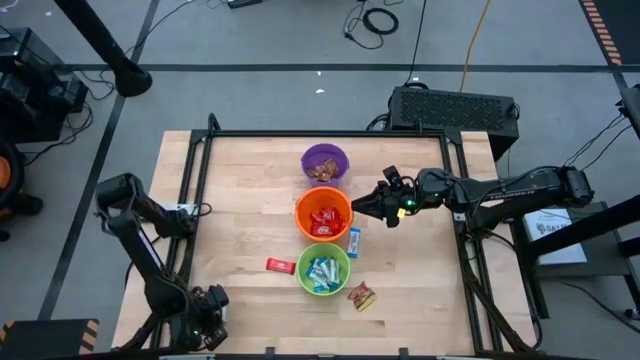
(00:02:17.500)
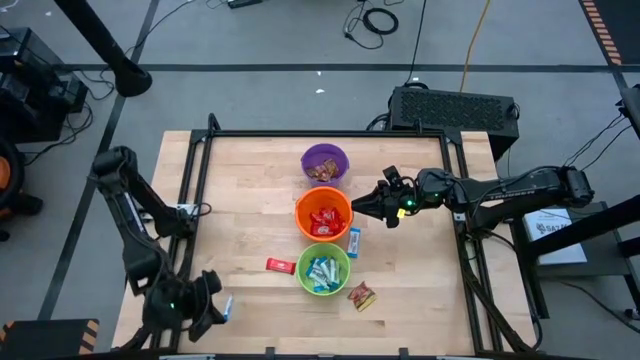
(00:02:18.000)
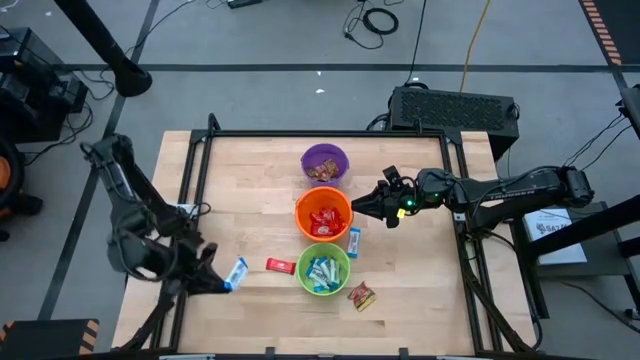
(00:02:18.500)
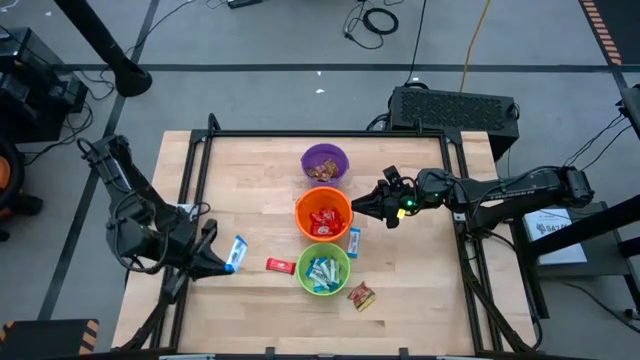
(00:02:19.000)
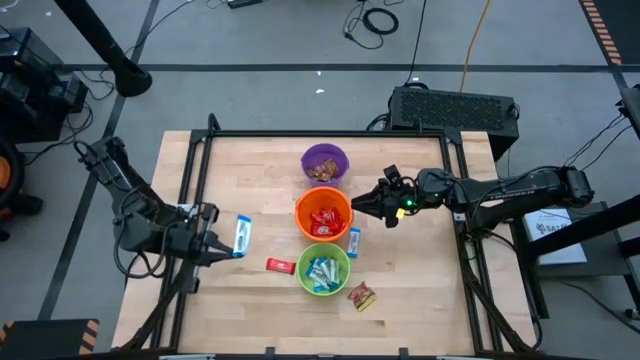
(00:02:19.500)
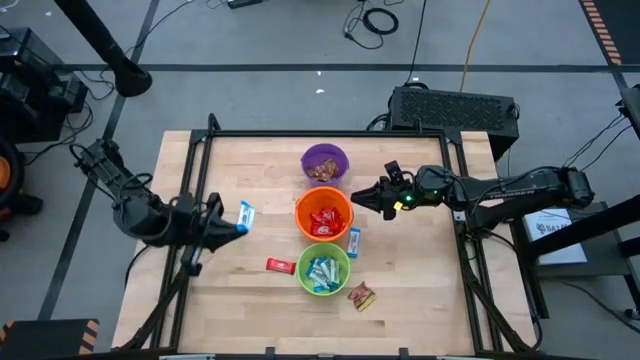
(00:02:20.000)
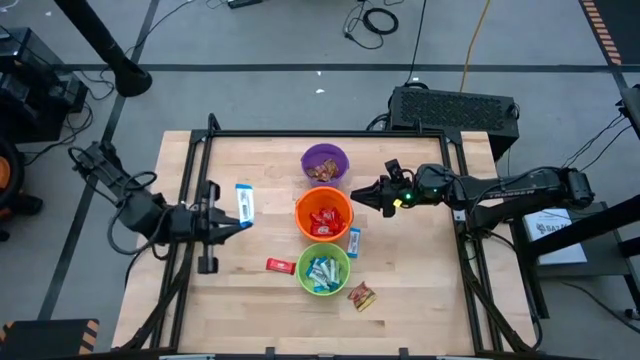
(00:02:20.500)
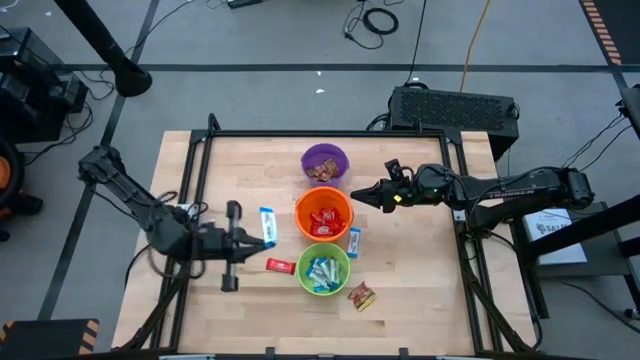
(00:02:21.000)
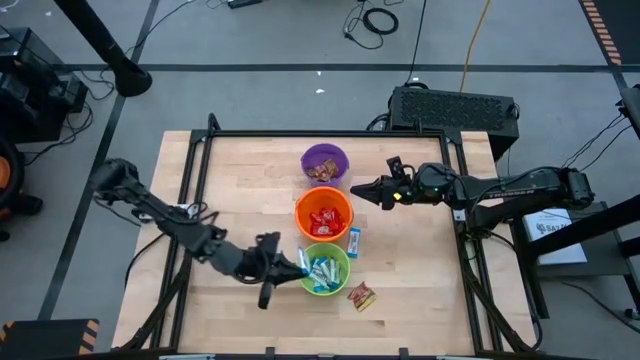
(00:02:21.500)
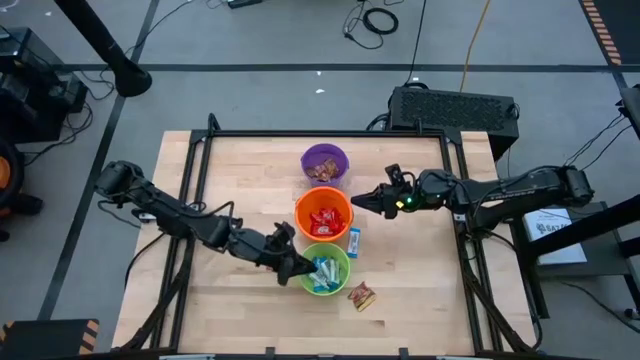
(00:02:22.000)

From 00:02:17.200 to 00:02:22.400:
Task: Sort candy by brand, put in halloween buckets
Put blue chocolate bar into the green bucket

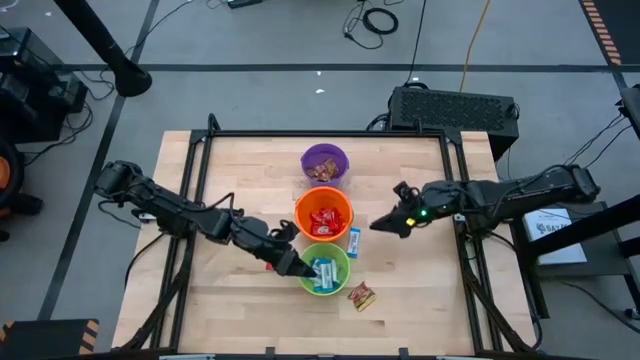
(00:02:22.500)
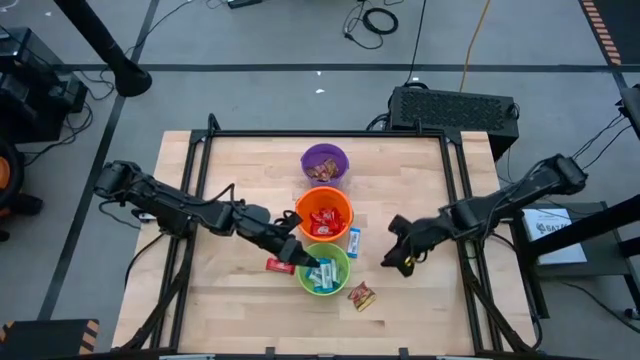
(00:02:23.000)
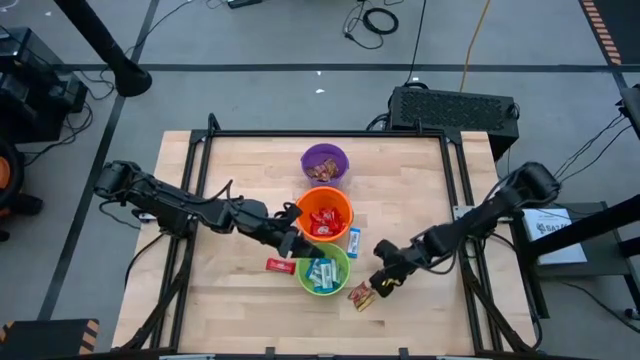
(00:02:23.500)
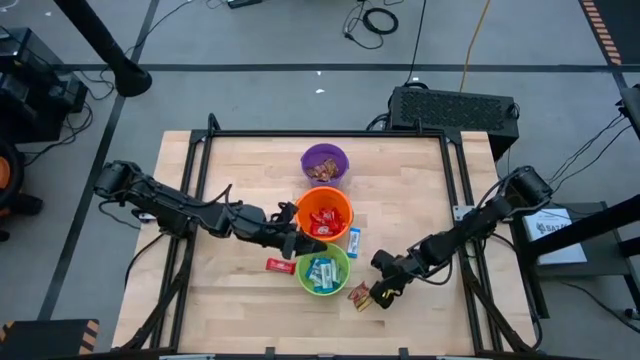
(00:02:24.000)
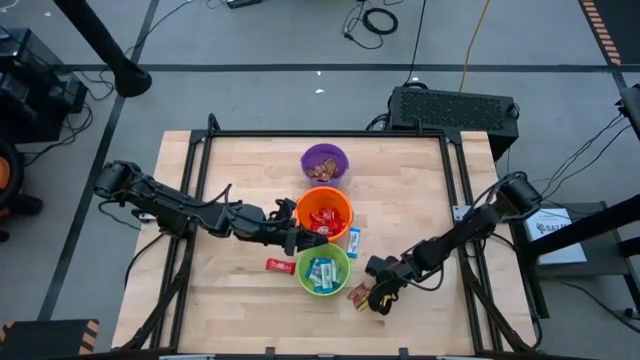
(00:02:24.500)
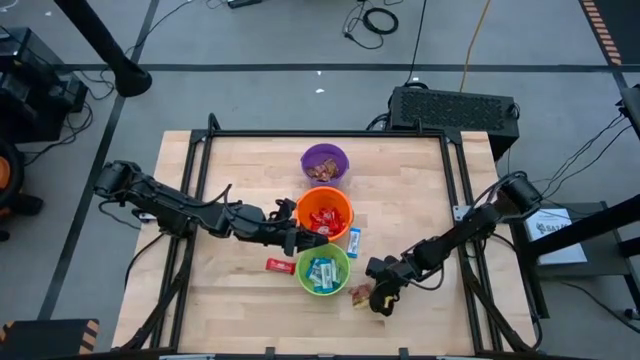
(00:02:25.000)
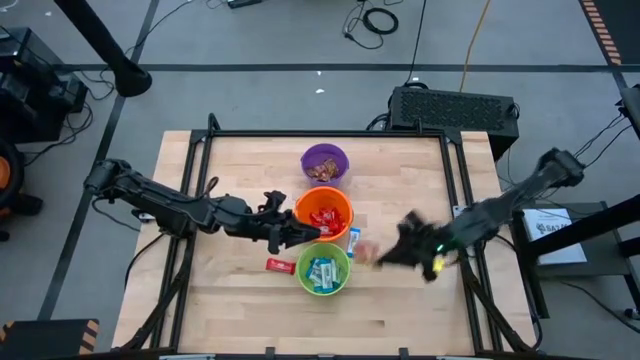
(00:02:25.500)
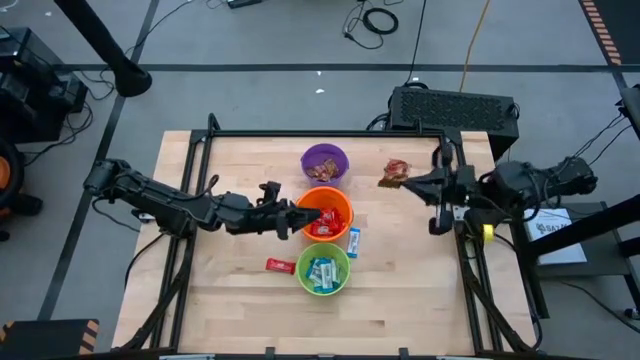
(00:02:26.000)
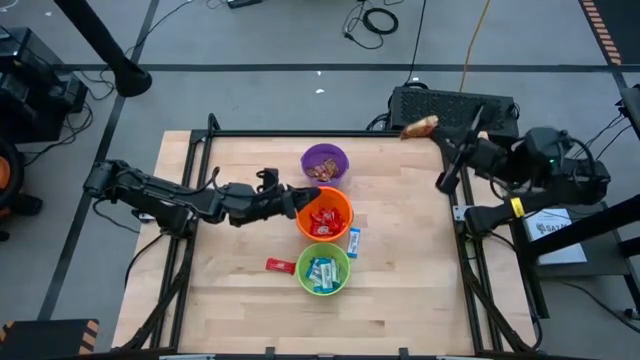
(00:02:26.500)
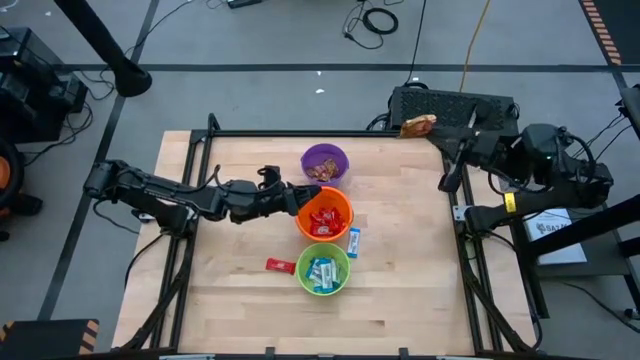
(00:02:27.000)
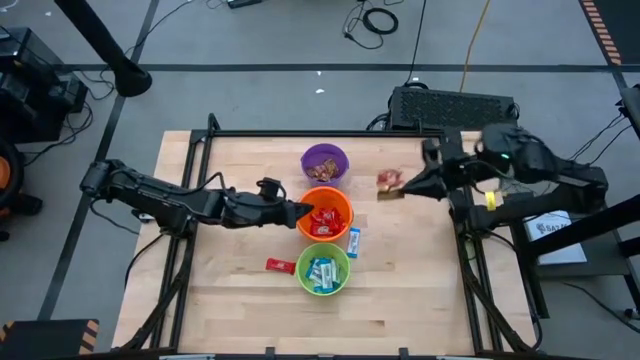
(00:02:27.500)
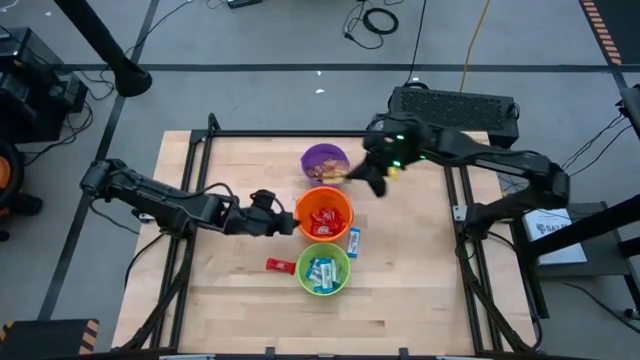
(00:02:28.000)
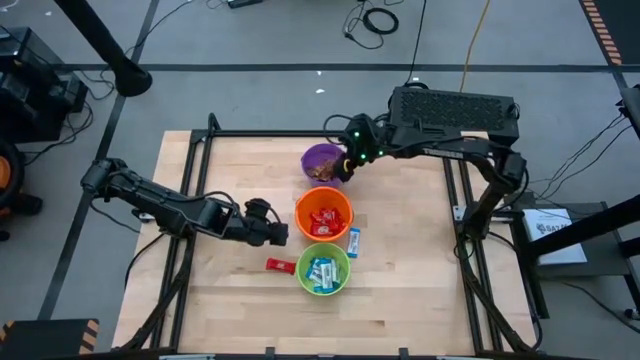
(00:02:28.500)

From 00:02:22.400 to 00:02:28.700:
Put golden candy into the purple bucket

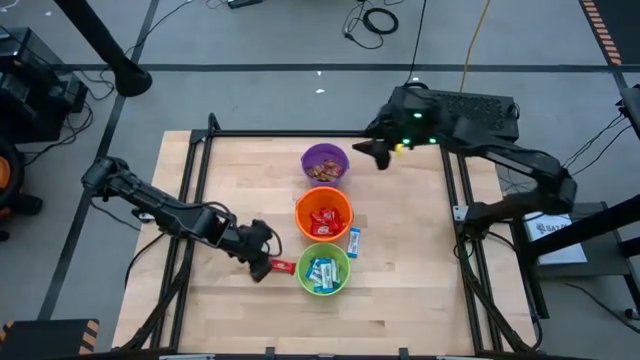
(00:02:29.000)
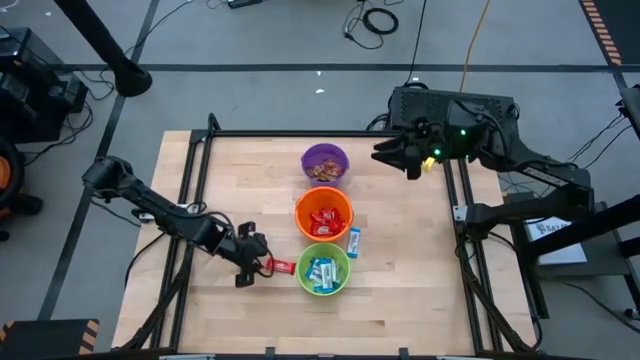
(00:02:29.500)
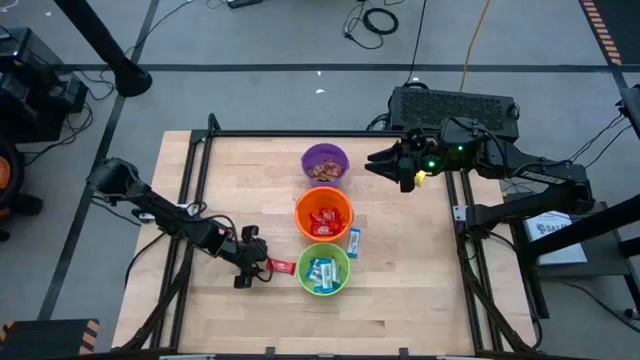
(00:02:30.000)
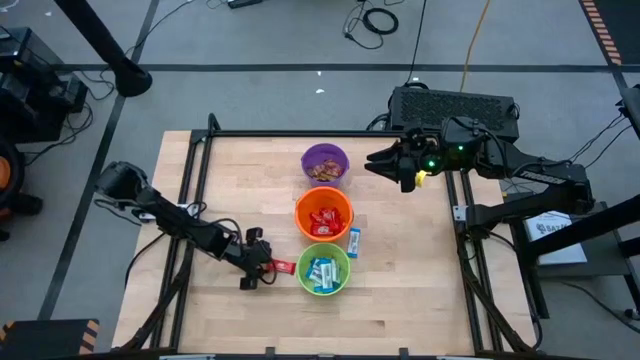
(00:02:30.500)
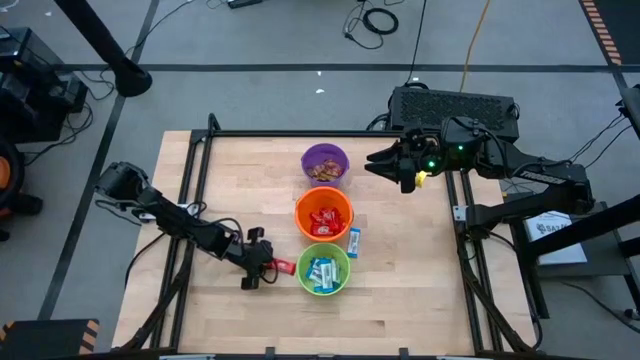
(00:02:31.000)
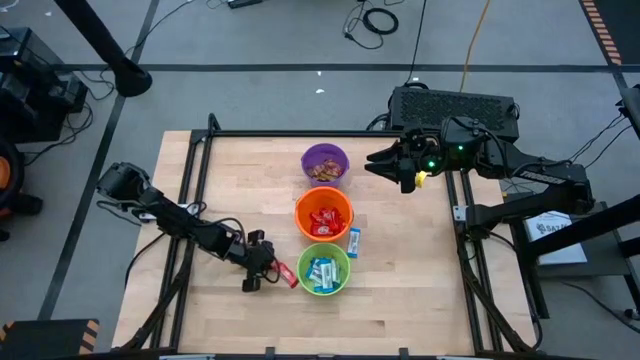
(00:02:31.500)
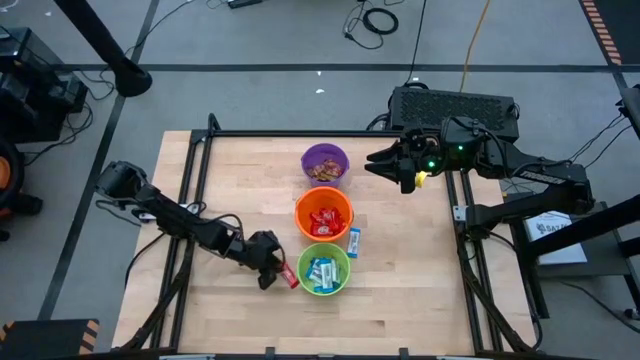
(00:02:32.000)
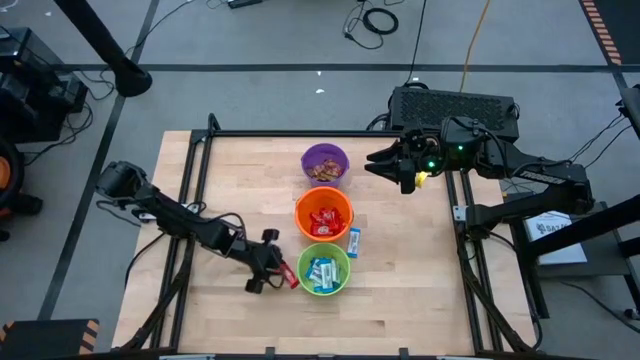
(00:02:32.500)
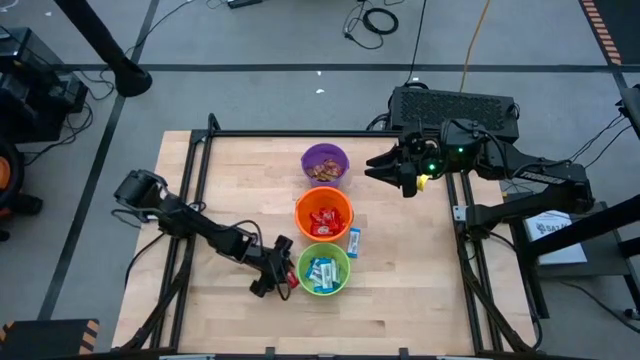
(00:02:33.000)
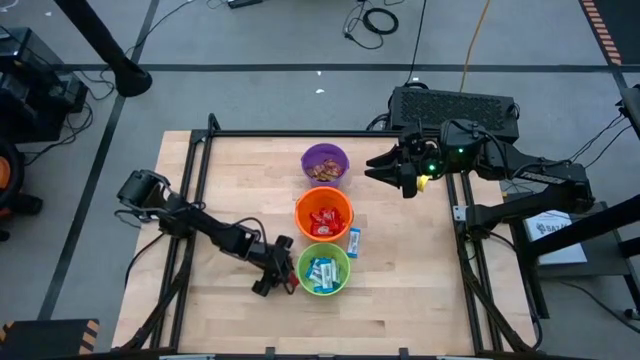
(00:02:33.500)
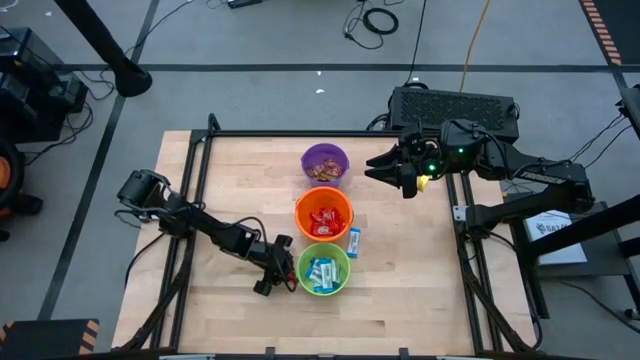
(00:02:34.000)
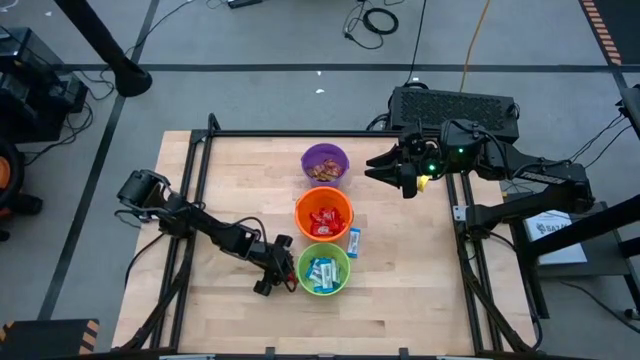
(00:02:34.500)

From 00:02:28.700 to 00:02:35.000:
Put red chocolate bar into the orange bucket

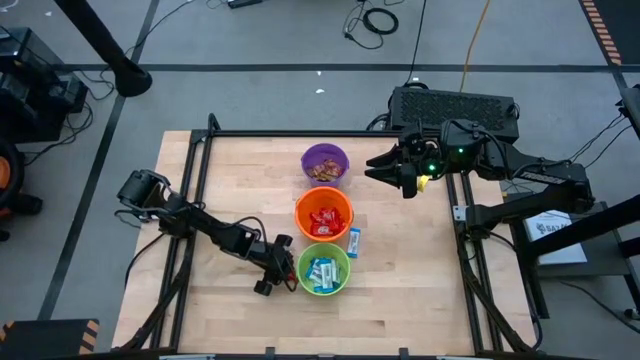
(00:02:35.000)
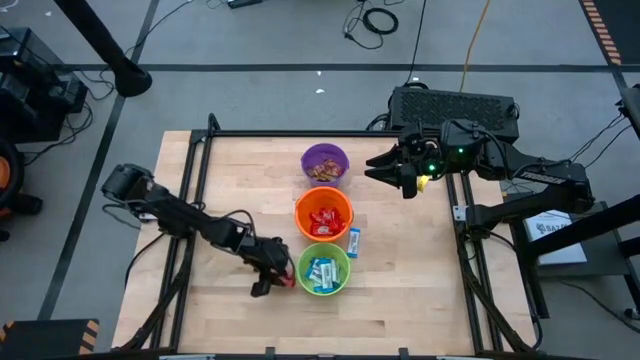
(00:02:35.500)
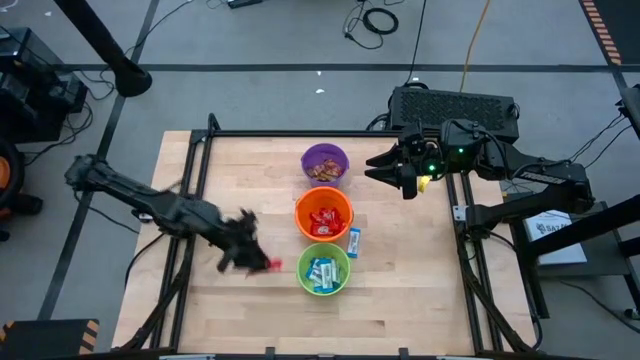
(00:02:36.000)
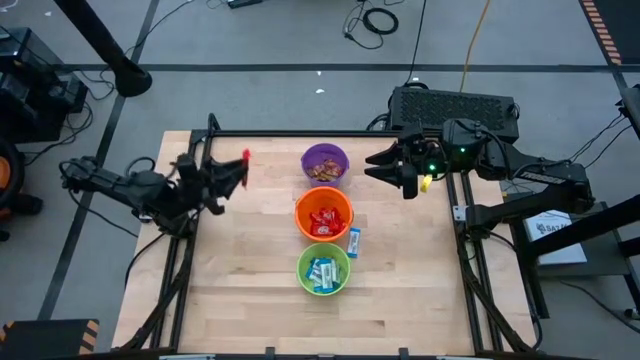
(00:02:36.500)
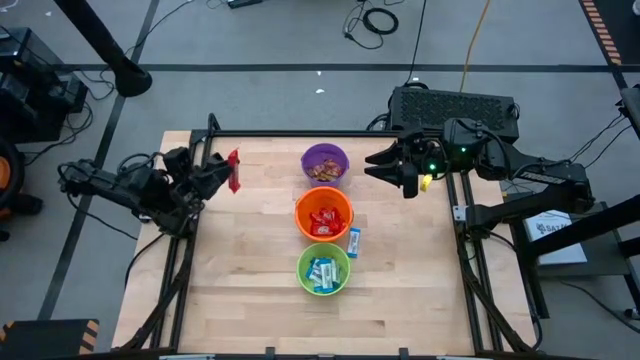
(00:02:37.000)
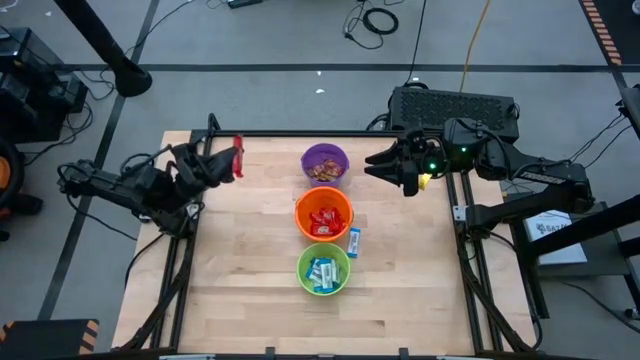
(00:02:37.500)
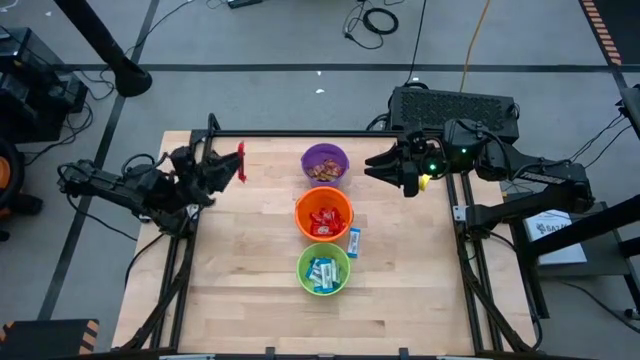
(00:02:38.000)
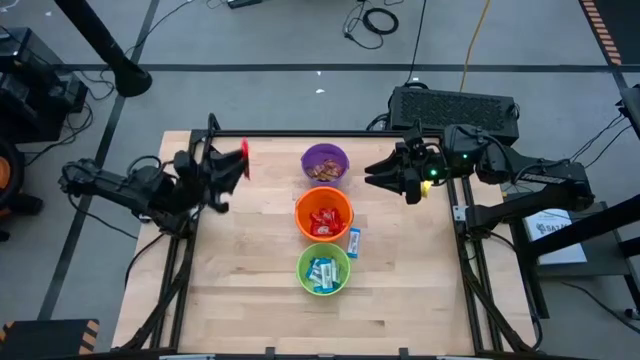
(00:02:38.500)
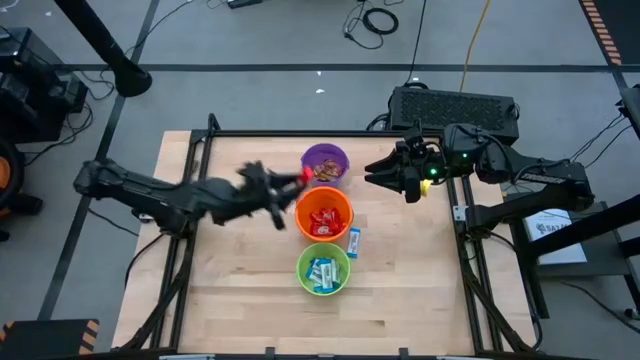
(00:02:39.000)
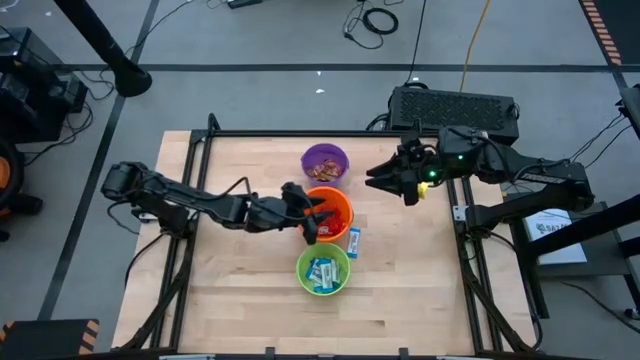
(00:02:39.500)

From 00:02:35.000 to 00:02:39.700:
Put red chocolate bar into the orange bucket
